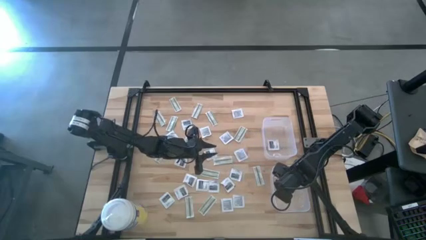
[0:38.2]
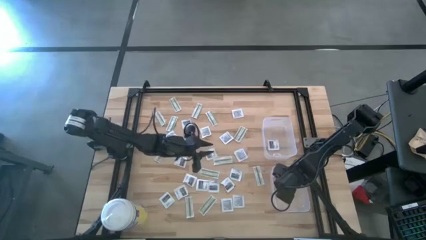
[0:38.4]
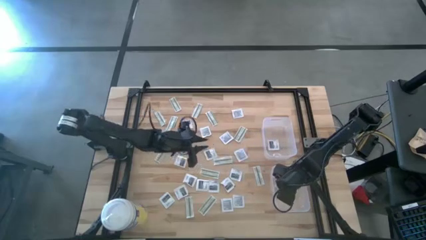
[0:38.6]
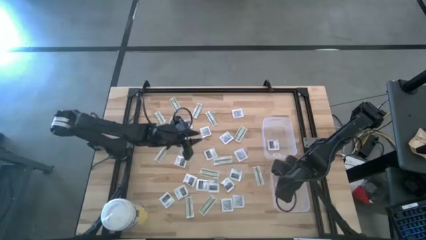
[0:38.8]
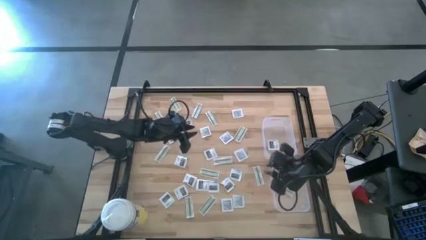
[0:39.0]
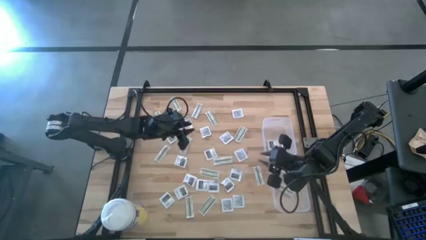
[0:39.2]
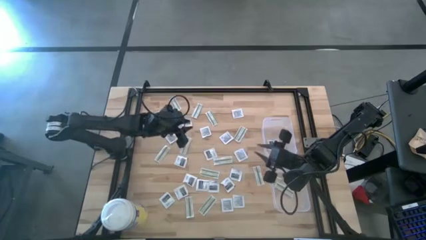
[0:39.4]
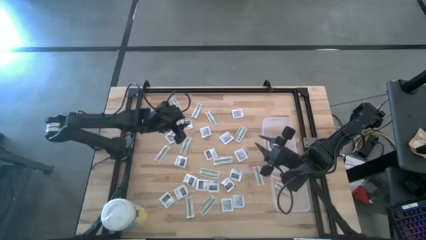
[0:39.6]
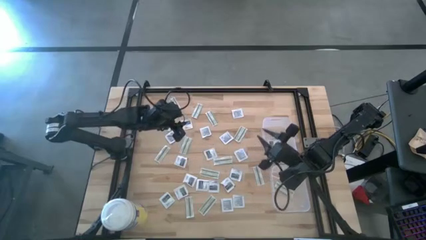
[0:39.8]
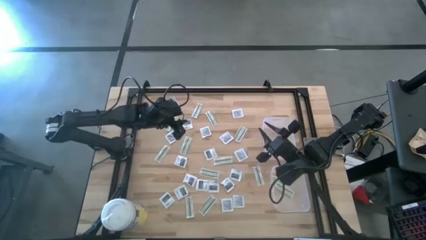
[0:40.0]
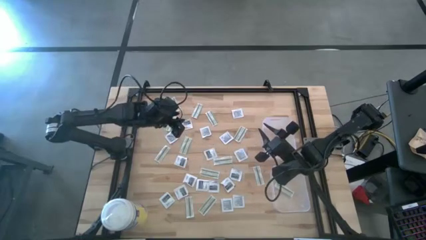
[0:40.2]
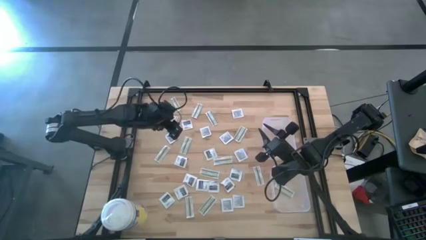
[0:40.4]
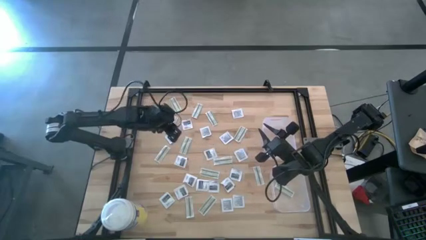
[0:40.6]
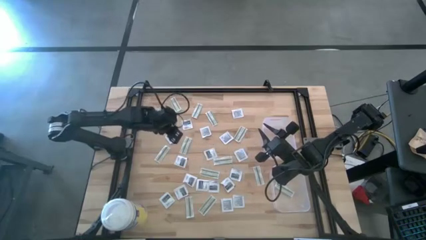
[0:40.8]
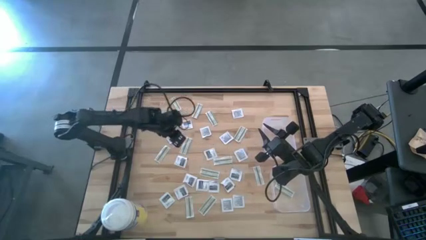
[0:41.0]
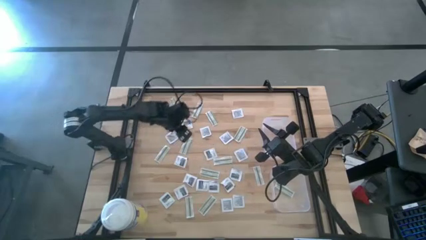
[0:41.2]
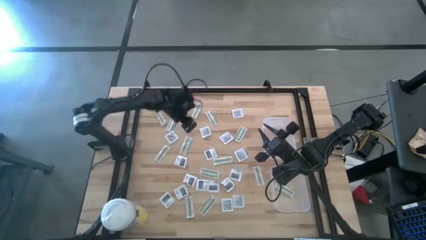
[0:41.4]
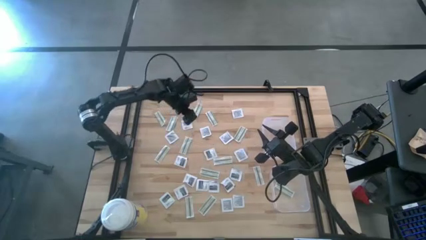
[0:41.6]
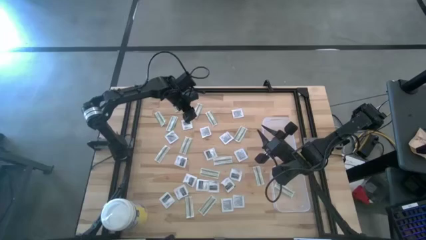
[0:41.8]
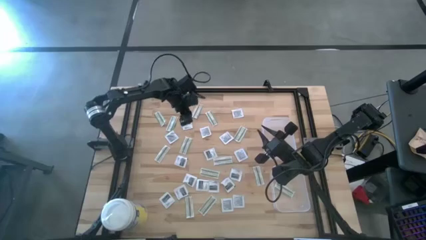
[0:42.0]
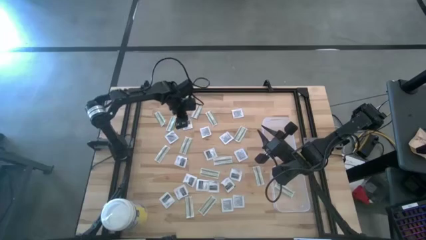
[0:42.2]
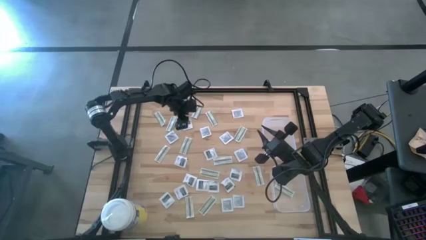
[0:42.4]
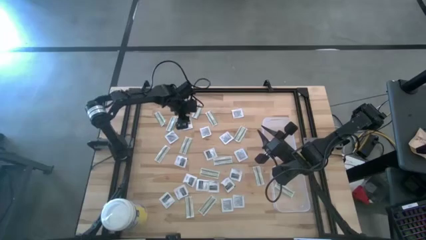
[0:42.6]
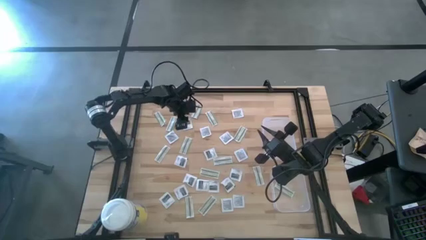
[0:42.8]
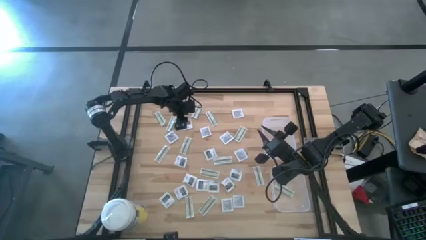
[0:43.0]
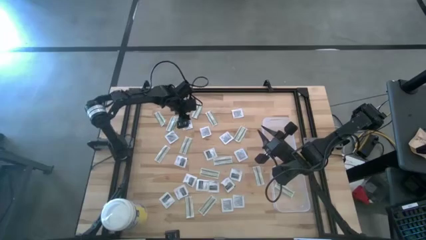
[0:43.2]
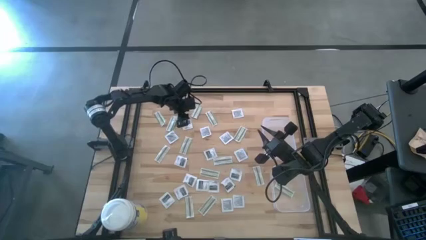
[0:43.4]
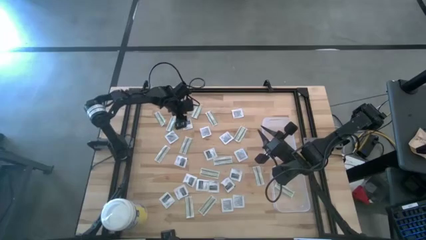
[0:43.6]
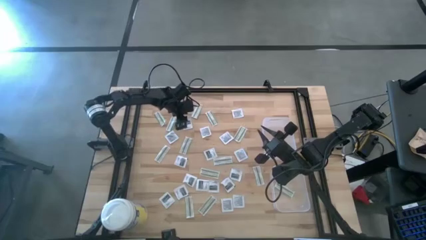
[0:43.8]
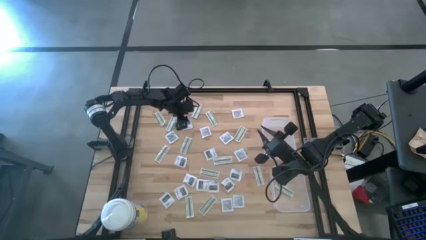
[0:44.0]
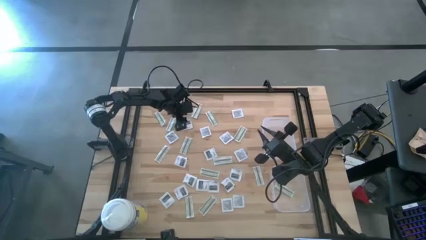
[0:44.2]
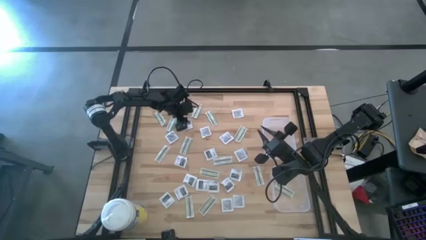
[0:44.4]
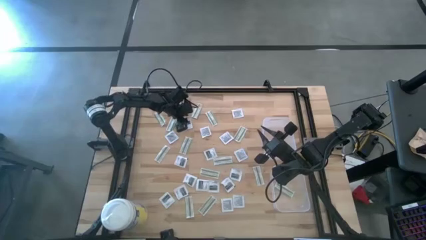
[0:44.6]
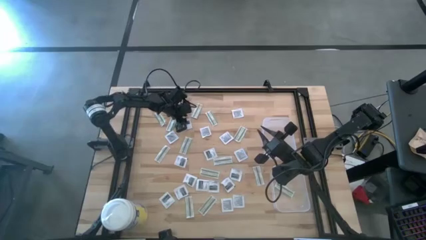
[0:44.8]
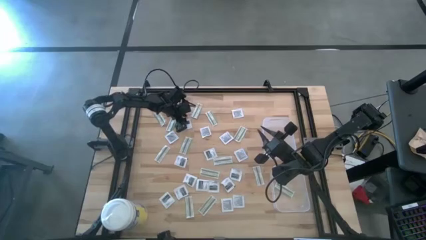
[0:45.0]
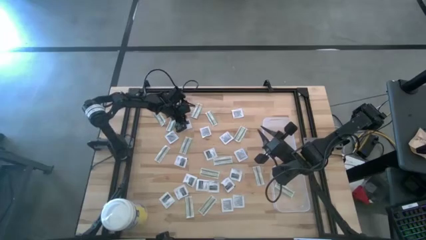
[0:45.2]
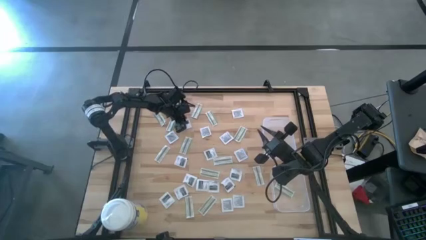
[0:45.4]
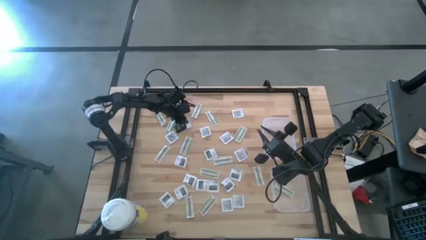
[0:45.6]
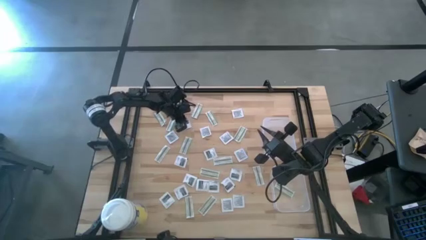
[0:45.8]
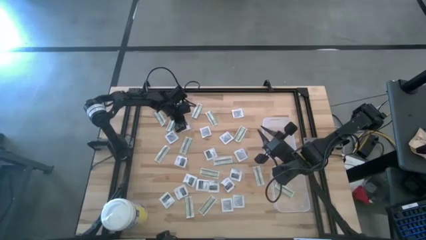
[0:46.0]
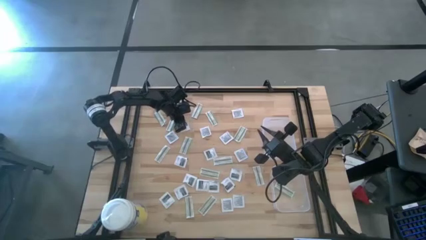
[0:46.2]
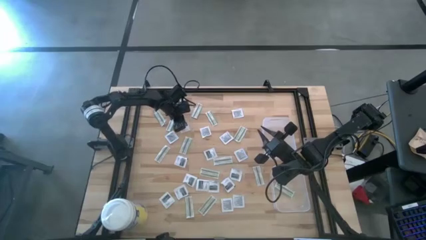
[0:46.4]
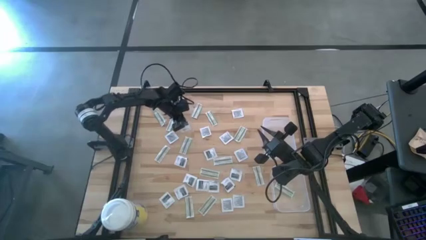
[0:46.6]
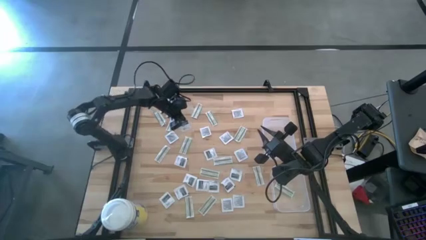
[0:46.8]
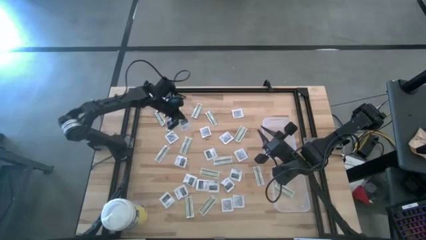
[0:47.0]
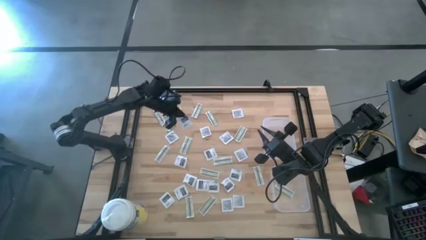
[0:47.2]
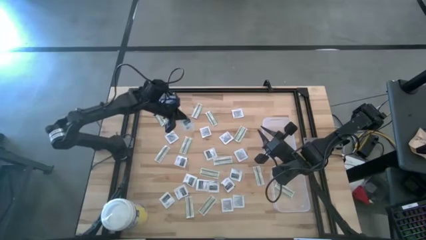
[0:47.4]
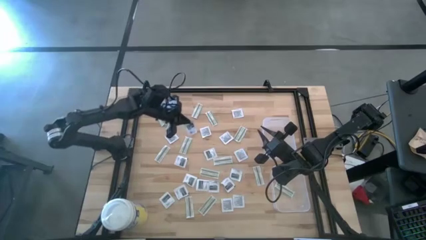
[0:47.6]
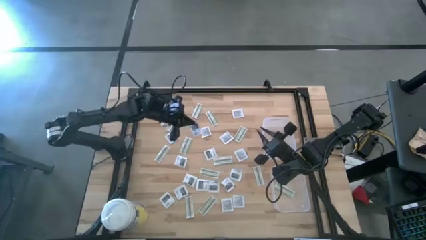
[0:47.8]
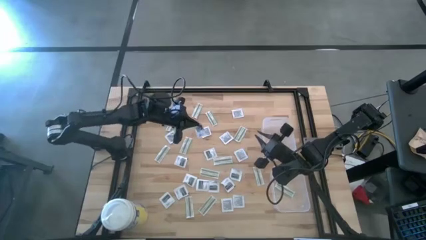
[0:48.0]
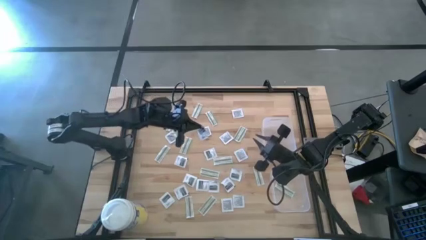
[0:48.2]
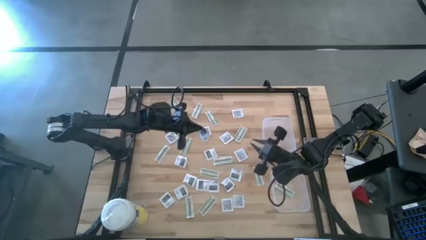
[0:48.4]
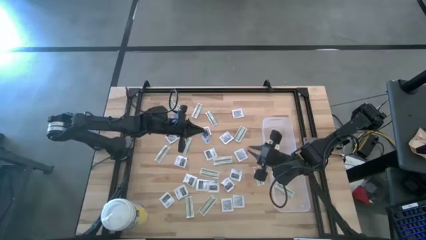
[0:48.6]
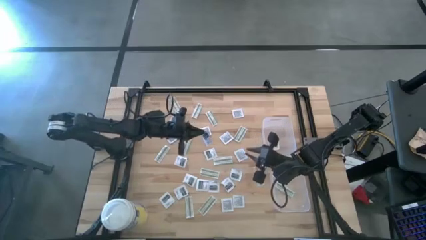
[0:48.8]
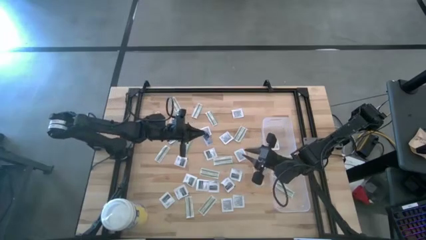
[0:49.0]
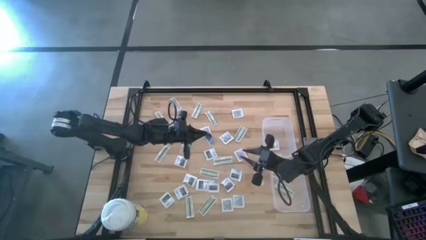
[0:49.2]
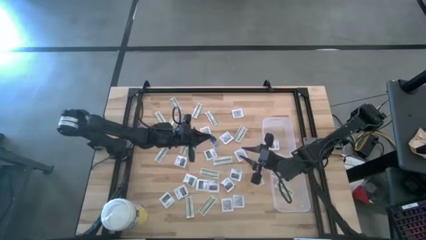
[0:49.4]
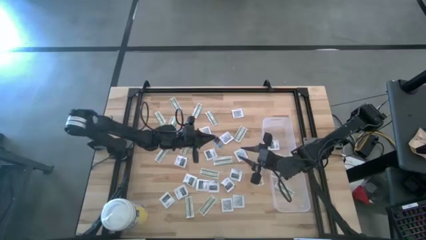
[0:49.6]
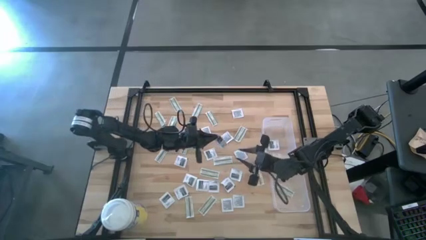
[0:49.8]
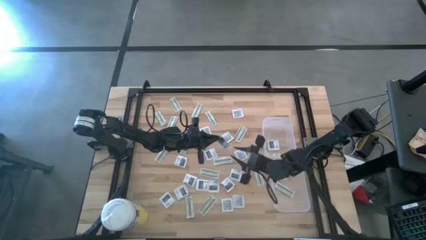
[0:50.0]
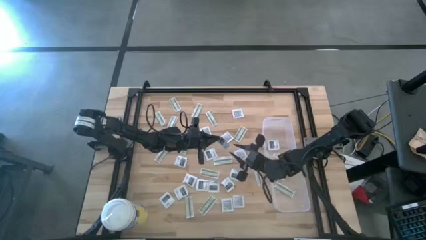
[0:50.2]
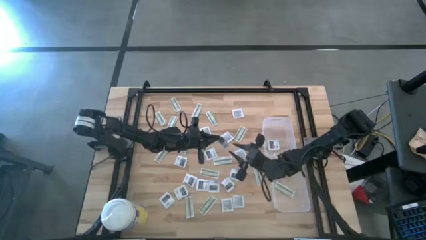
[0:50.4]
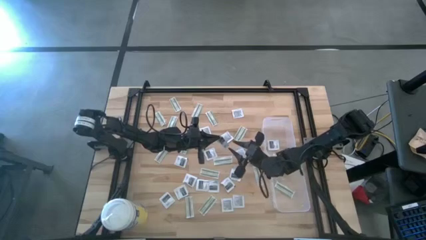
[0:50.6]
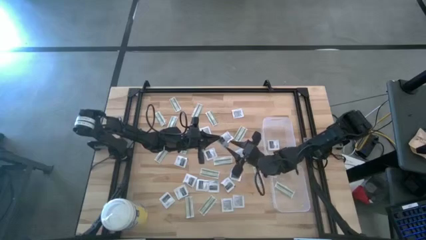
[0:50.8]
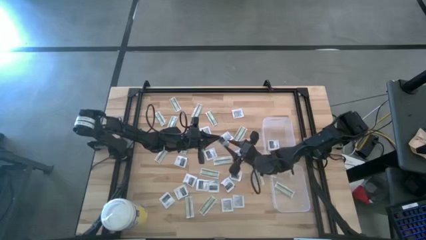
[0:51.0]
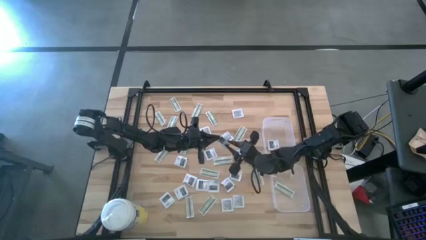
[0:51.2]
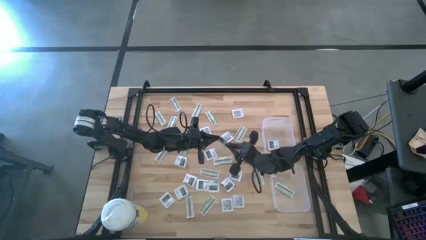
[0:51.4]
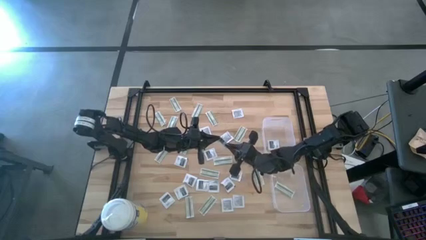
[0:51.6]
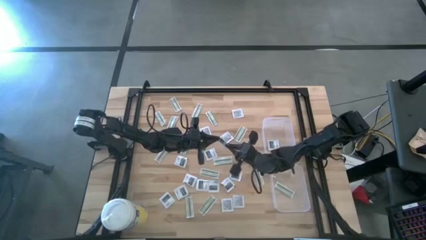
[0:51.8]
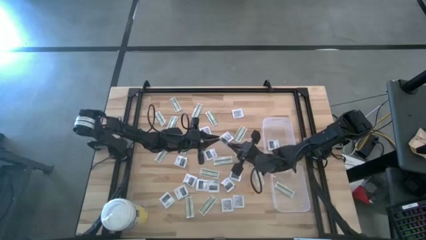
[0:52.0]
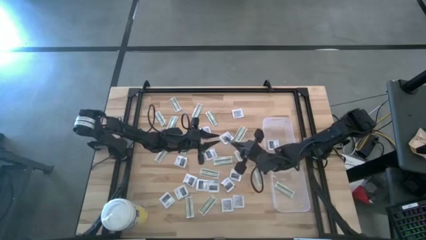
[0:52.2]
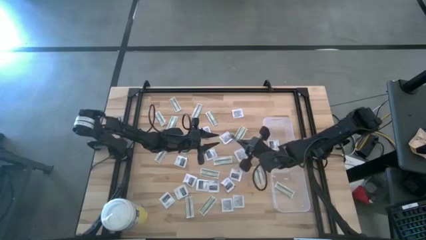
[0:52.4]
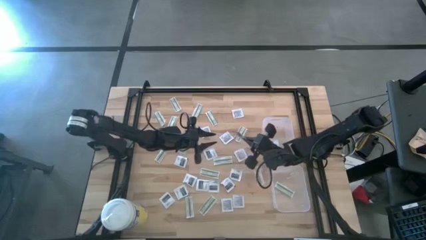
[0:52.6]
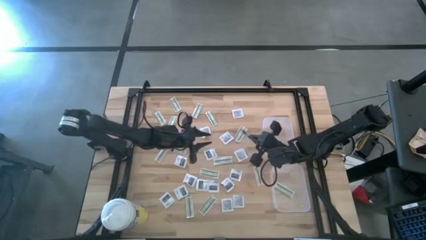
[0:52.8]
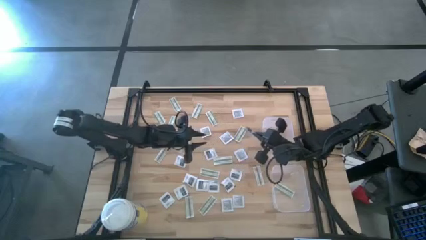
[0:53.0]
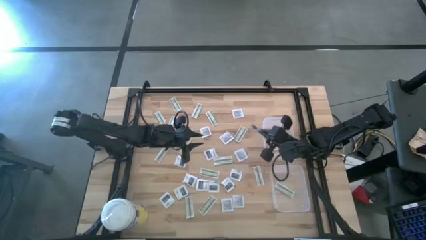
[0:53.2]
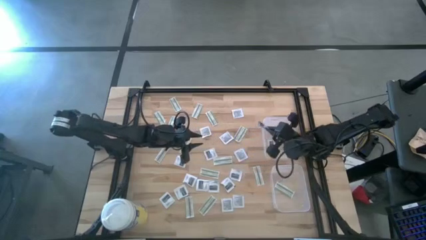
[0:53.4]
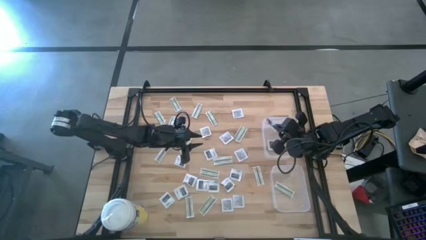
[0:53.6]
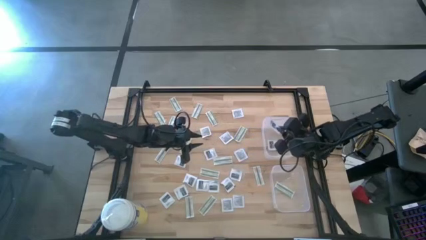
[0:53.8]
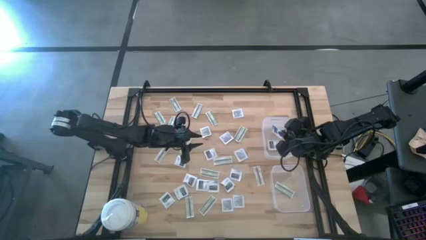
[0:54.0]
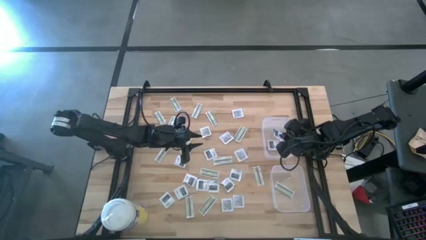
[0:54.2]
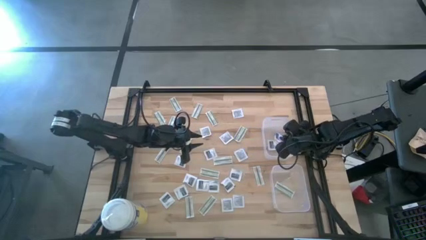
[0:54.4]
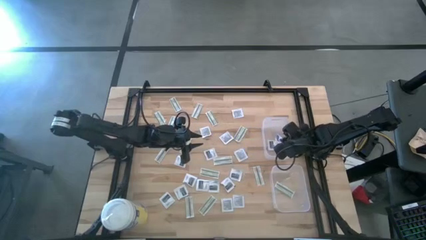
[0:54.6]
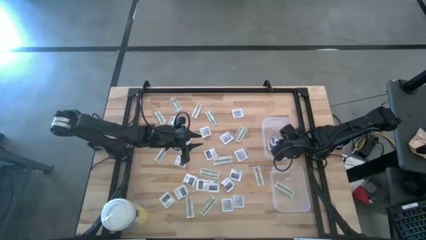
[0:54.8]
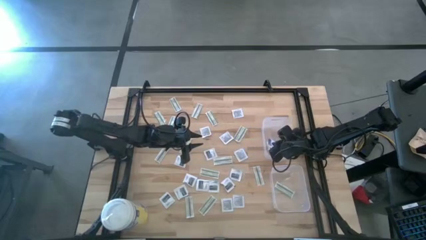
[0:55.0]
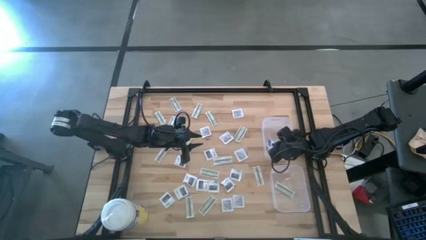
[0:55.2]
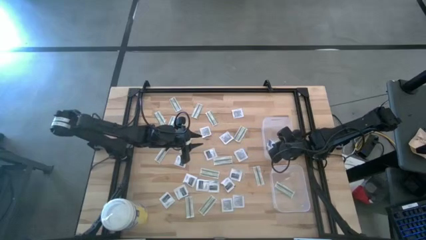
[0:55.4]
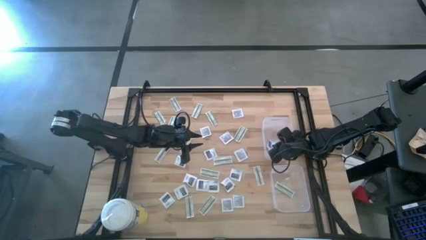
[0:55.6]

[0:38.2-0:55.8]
Task: Pick & Place First Aid Supplies
Put the towelette pack into the top bin
